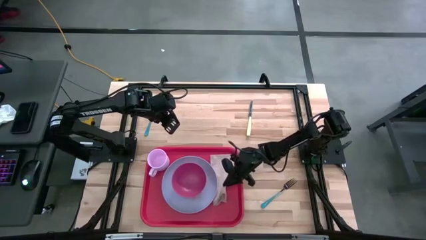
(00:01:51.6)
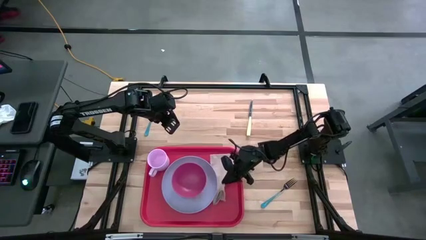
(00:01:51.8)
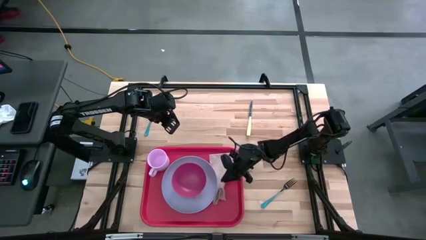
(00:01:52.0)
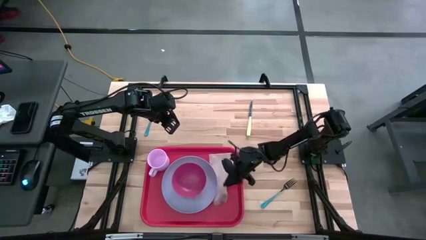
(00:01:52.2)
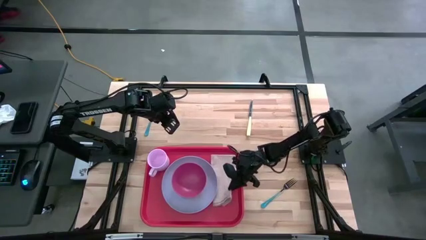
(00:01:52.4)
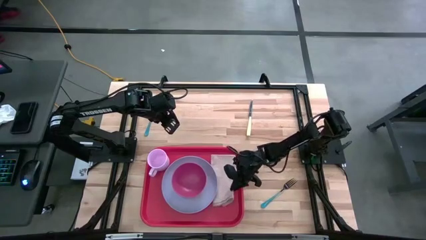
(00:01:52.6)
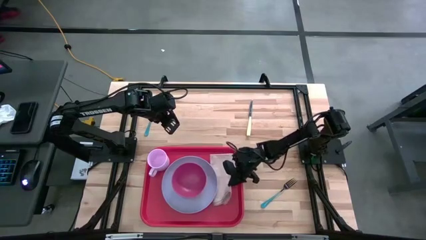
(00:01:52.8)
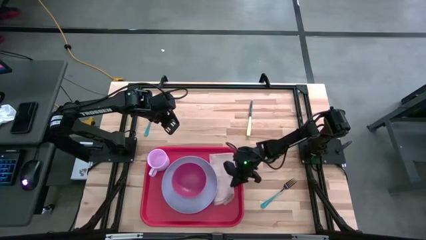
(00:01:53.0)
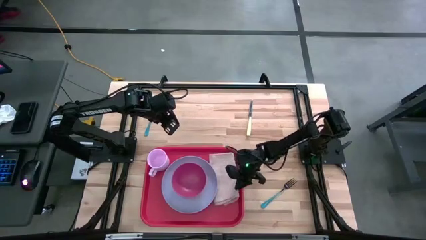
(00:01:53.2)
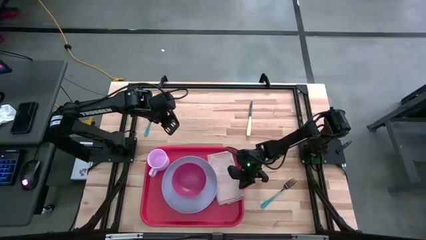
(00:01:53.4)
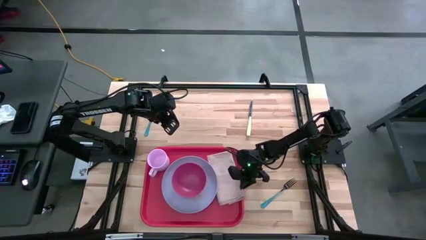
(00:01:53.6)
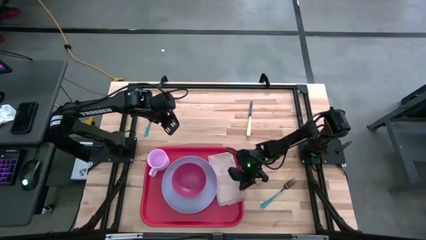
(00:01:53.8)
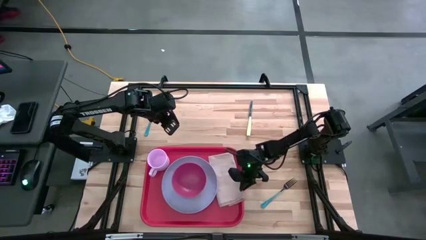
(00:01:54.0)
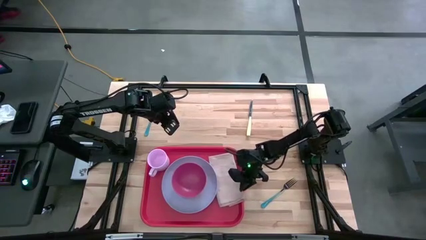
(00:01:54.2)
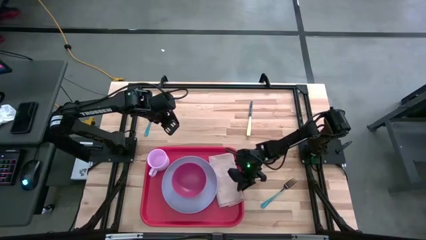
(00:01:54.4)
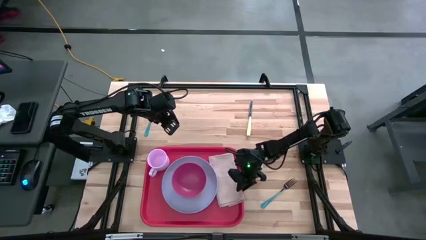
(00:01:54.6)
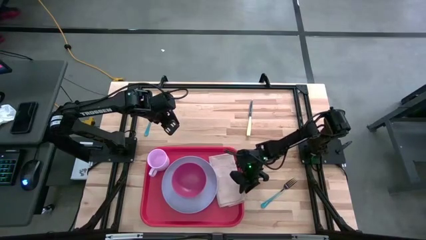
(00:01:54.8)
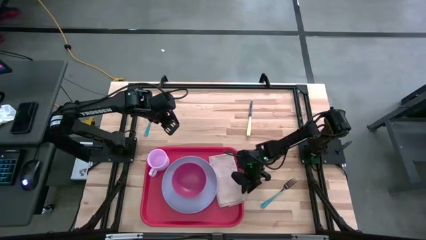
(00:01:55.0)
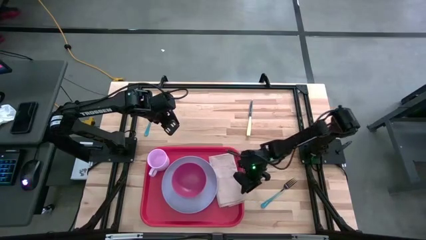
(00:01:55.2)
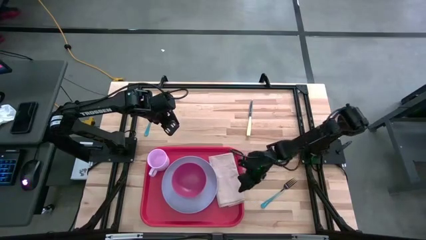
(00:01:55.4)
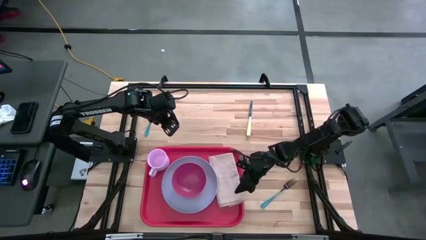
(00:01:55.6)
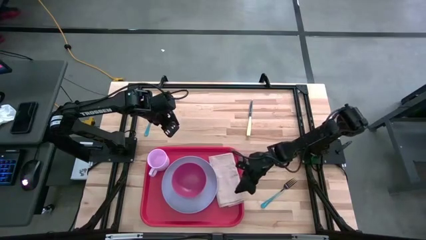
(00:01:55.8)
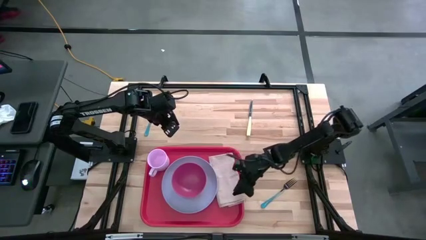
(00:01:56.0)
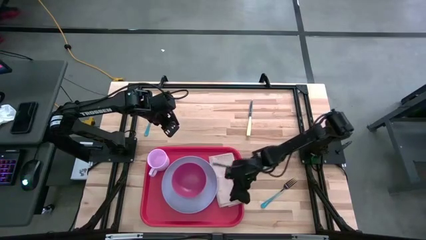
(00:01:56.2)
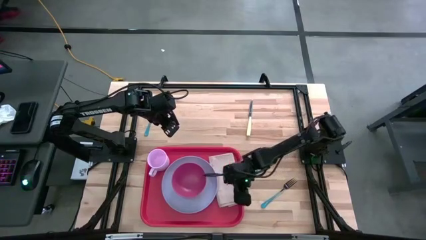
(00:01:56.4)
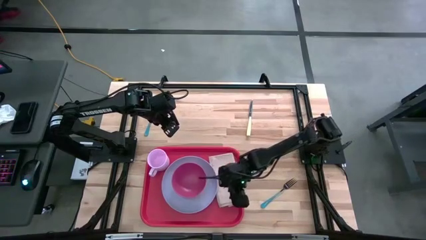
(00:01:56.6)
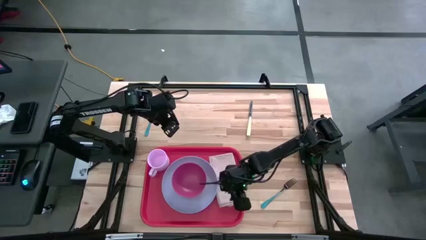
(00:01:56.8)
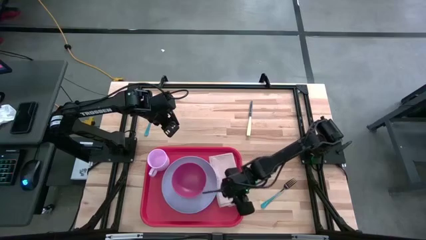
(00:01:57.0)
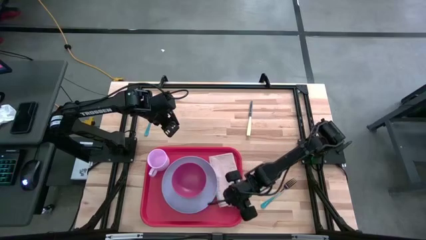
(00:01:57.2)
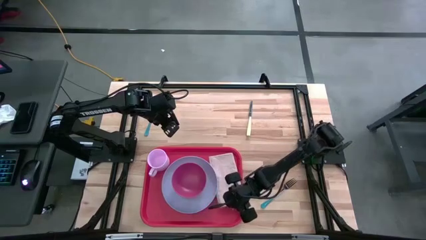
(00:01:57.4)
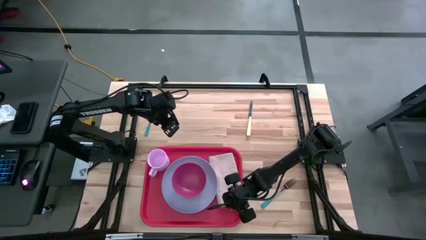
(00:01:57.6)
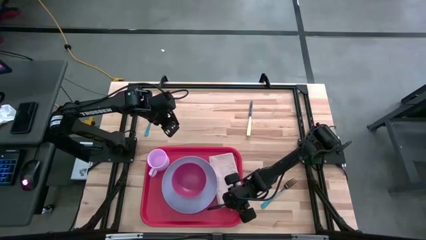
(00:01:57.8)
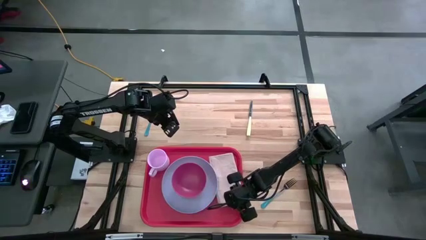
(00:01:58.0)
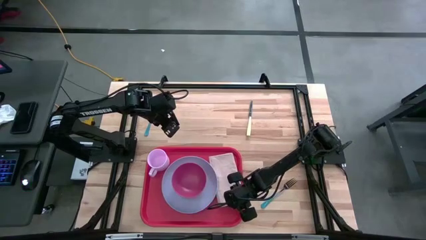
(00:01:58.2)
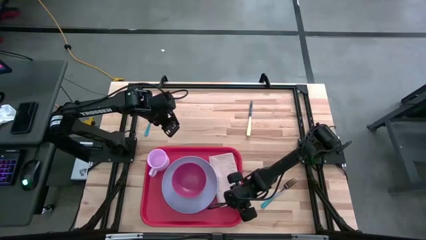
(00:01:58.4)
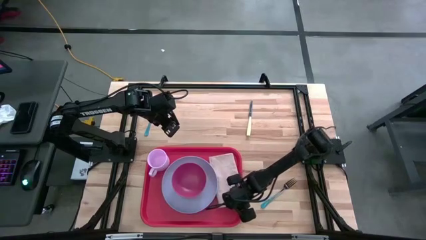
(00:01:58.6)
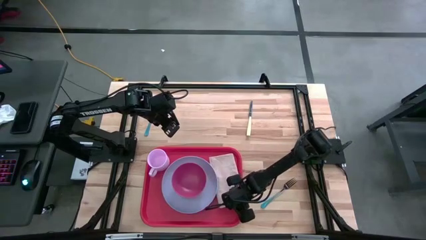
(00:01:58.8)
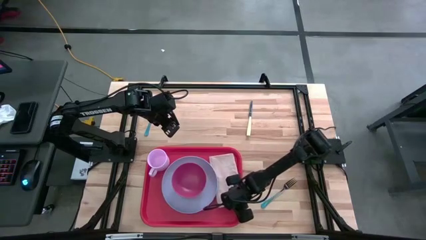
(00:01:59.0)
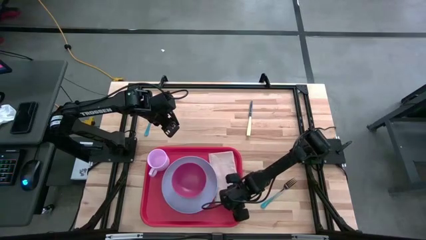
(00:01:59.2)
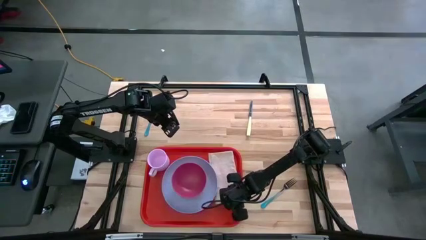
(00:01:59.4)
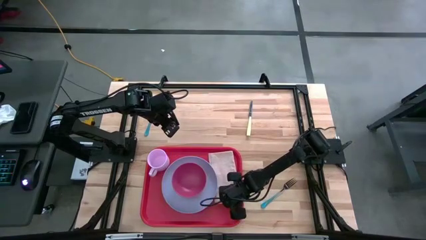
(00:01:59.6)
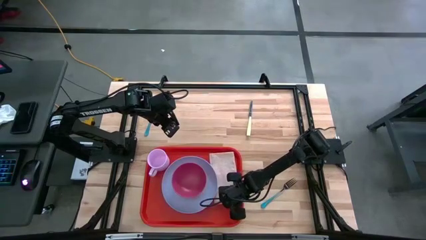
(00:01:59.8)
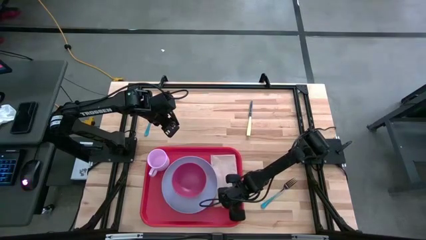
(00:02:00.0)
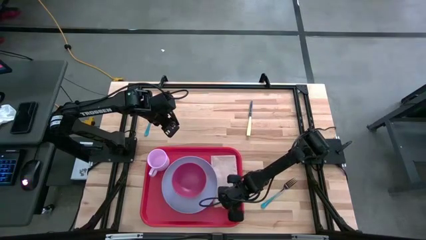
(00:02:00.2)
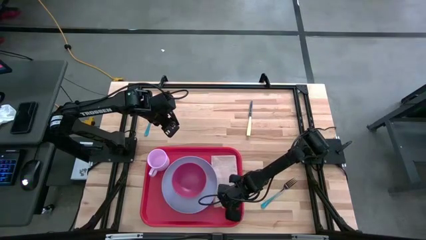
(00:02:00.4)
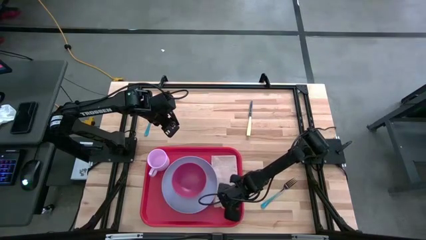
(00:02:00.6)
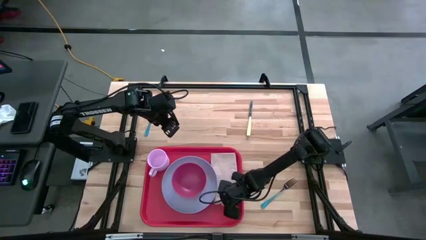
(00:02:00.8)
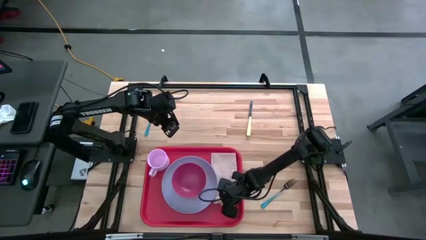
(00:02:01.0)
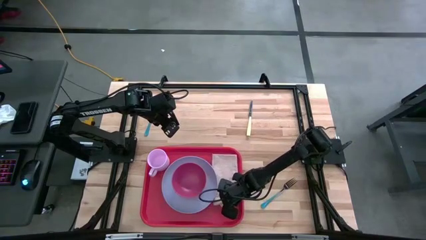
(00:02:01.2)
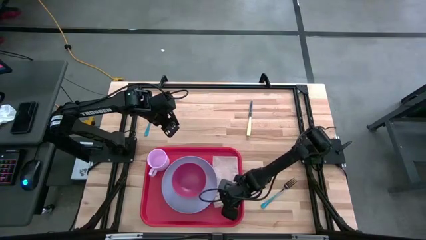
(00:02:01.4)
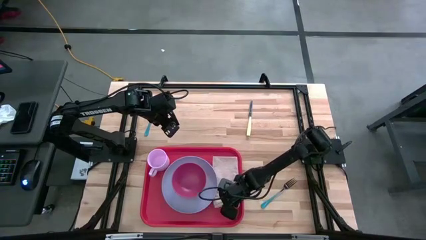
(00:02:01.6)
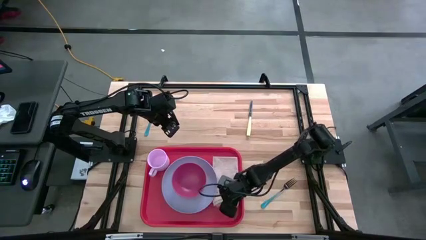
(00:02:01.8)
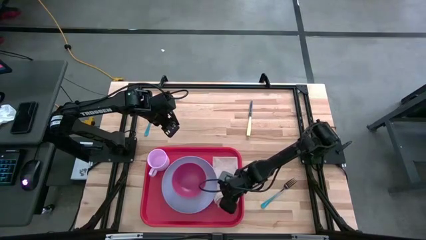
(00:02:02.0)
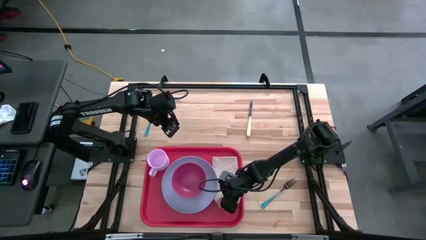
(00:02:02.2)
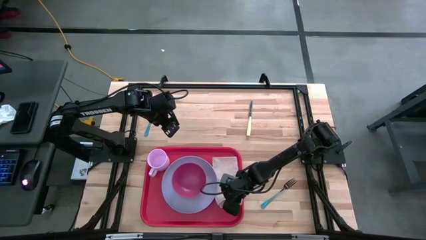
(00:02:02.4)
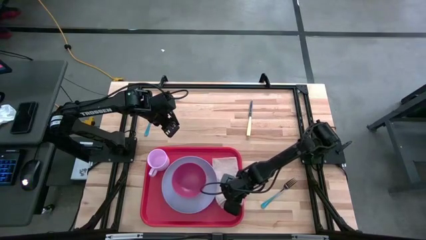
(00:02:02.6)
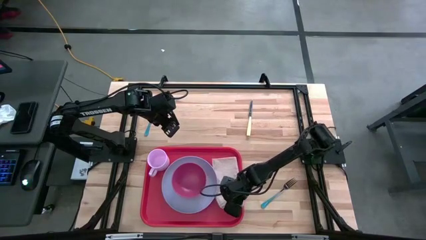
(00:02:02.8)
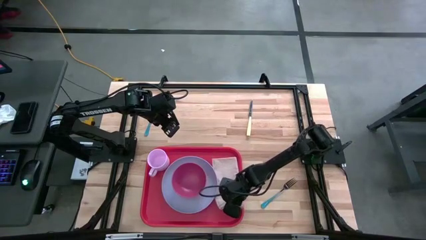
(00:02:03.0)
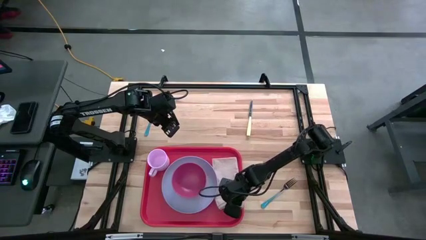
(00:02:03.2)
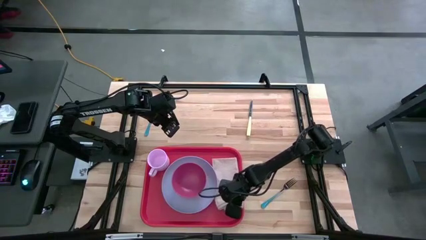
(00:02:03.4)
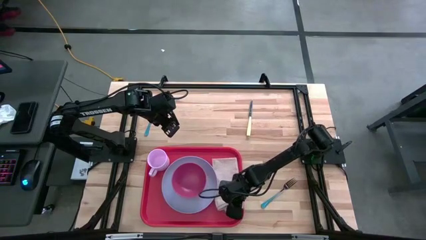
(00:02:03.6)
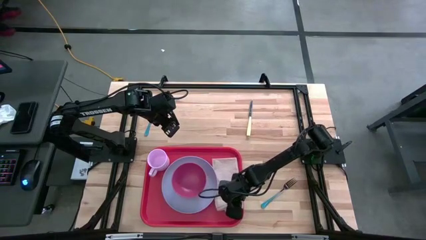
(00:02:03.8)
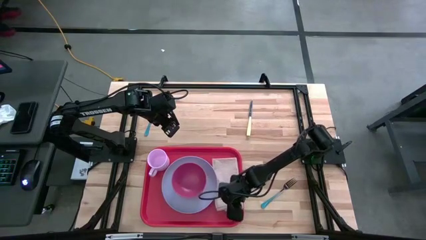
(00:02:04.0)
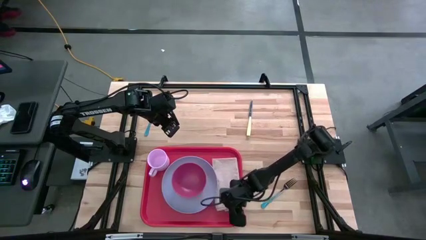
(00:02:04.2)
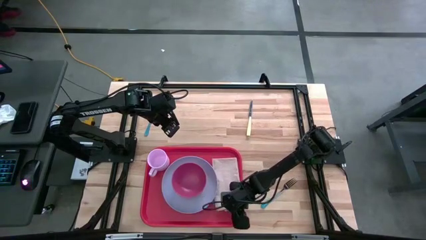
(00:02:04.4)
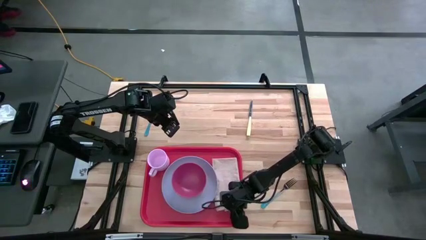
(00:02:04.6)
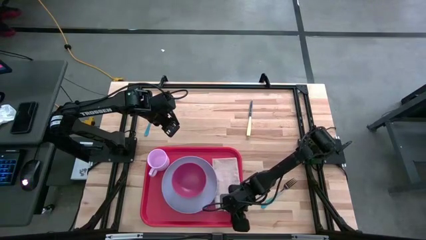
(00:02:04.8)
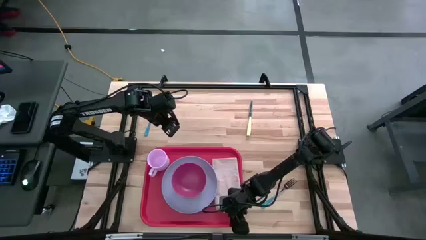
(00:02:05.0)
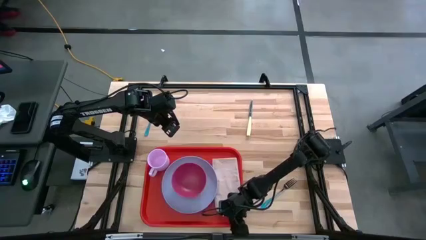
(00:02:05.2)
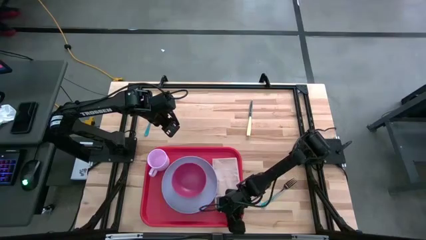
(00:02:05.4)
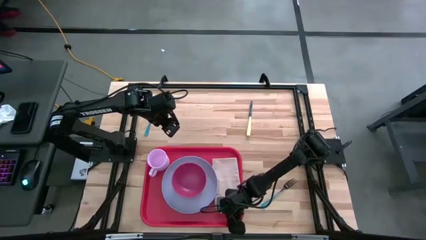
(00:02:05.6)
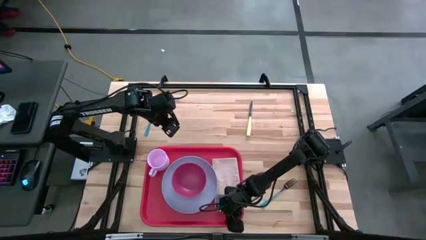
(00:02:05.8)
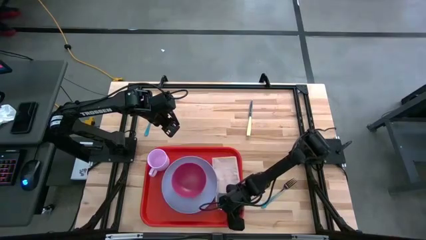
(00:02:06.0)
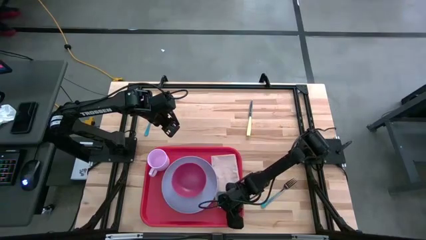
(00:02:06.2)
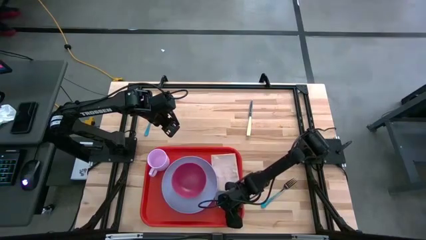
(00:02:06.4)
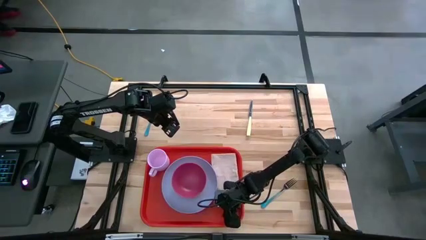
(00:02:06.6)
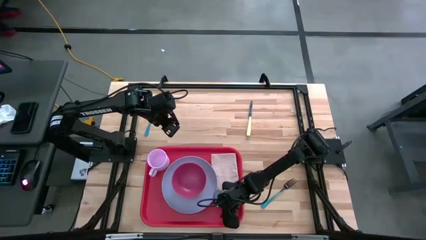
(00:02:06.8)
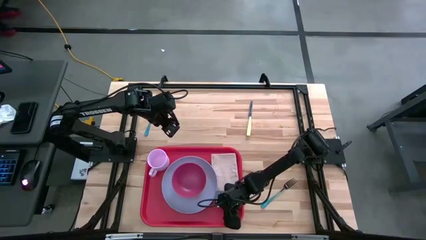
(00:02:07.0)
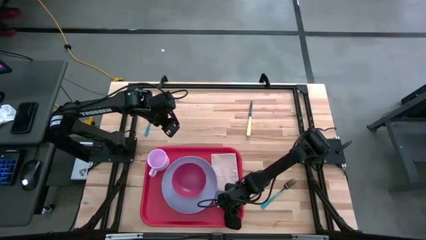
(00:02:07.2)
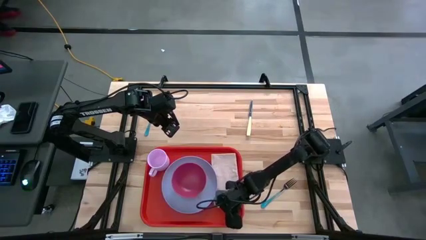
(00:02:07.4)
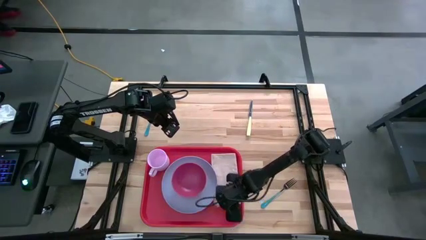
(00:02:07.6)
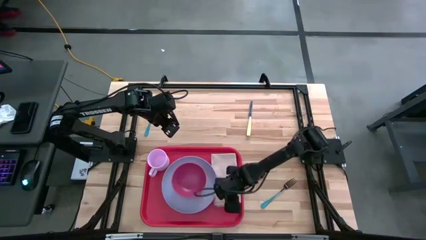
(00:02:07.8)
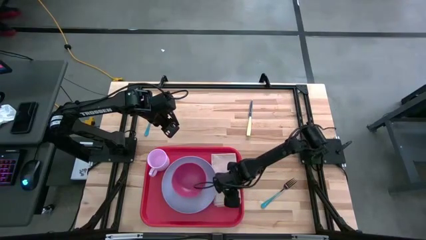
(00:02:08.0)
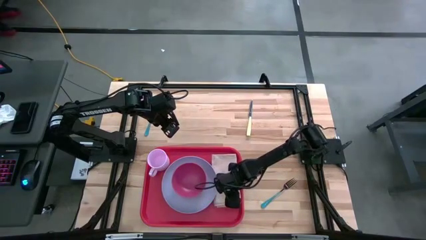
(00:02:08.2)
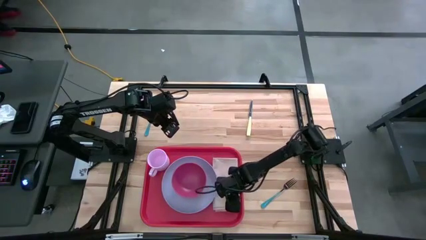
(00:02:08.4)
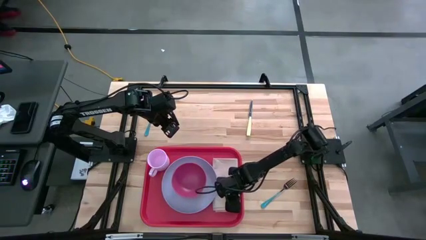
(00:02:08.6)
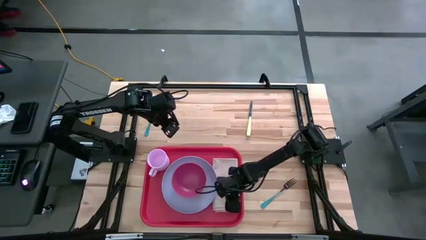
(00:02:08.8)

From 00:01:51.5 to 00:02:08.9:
Task: Set up tray
Put the peach napkin to the right of the purple plate on the orange serving tray
